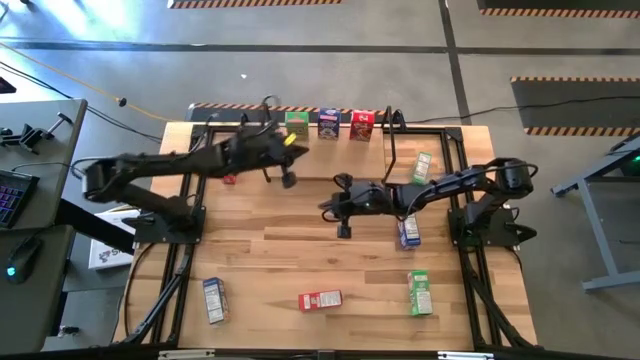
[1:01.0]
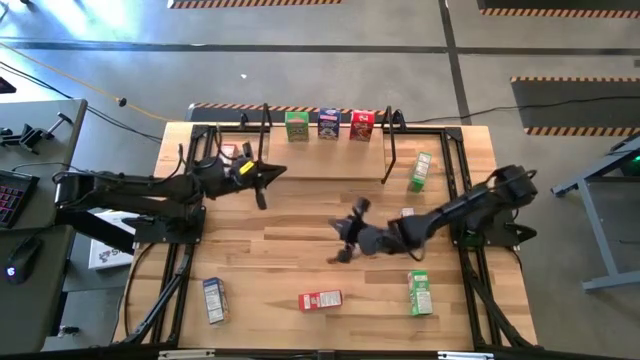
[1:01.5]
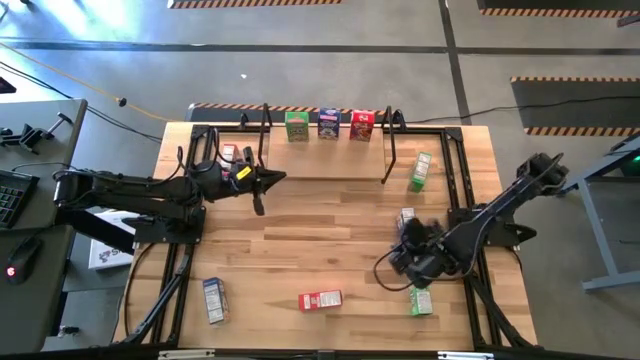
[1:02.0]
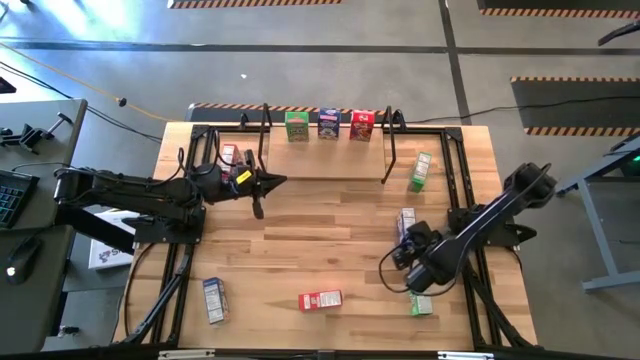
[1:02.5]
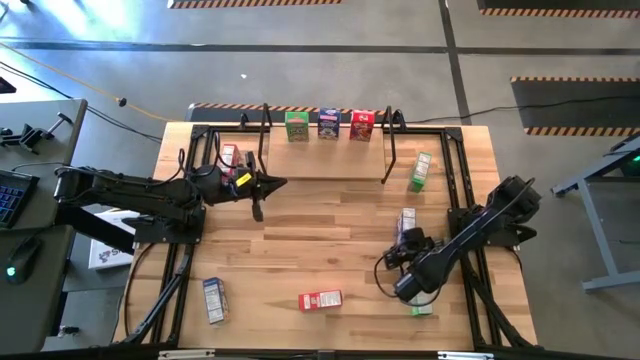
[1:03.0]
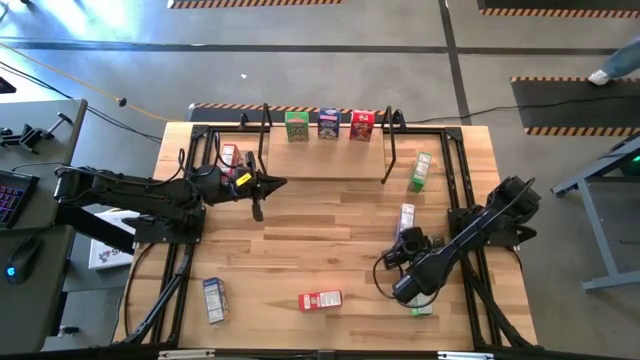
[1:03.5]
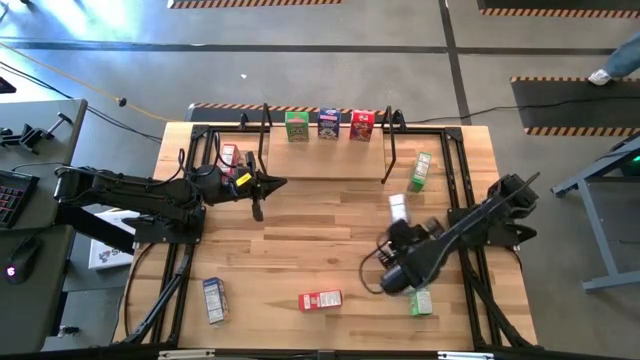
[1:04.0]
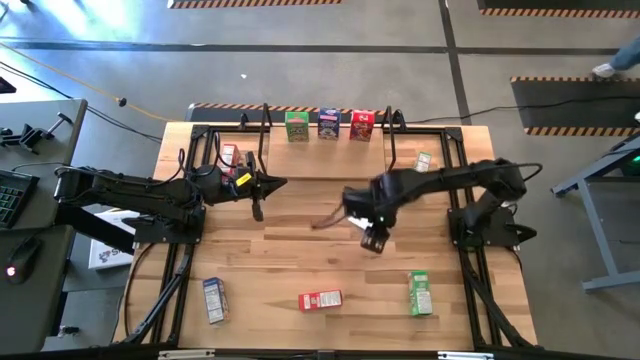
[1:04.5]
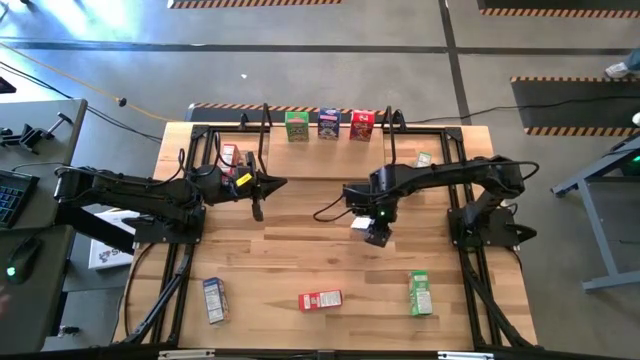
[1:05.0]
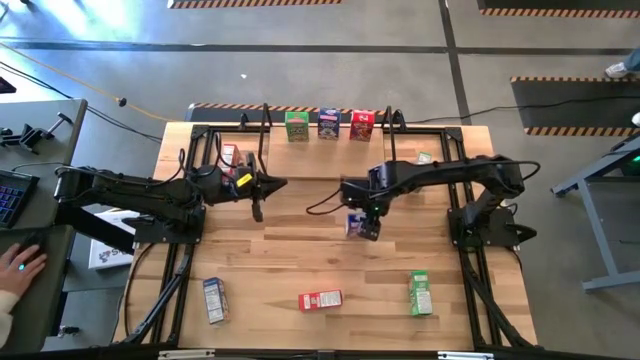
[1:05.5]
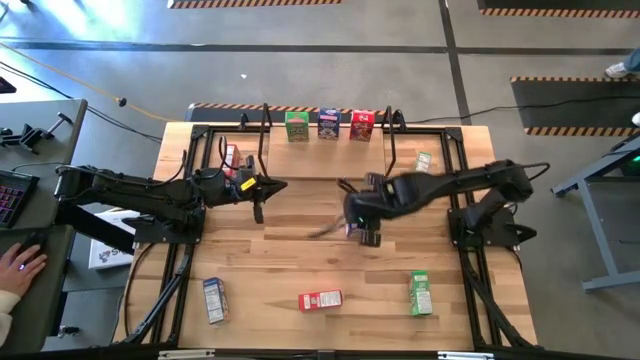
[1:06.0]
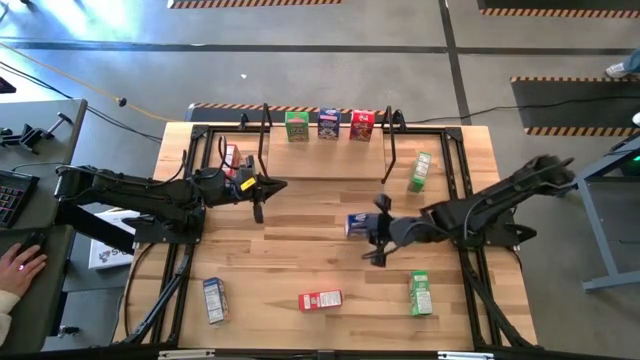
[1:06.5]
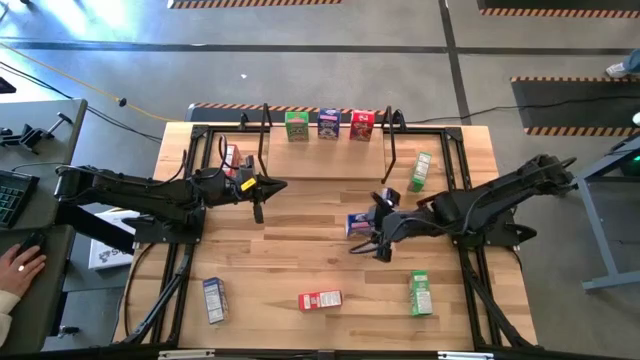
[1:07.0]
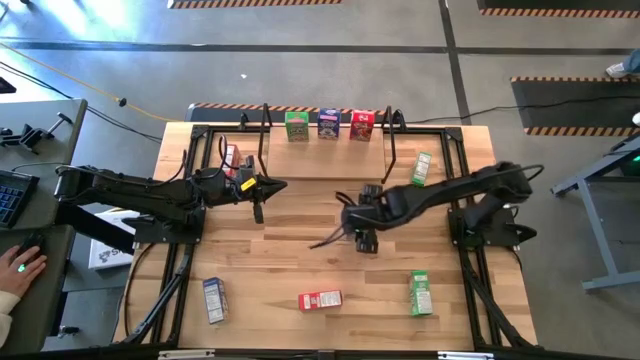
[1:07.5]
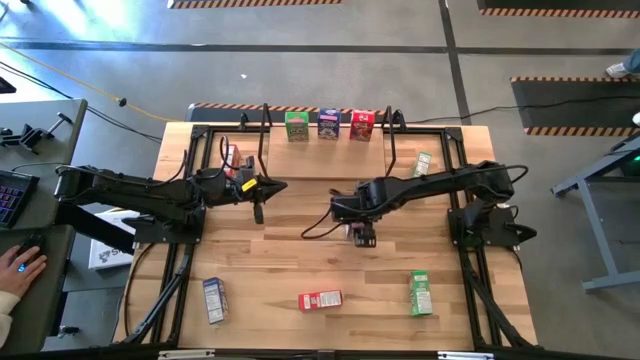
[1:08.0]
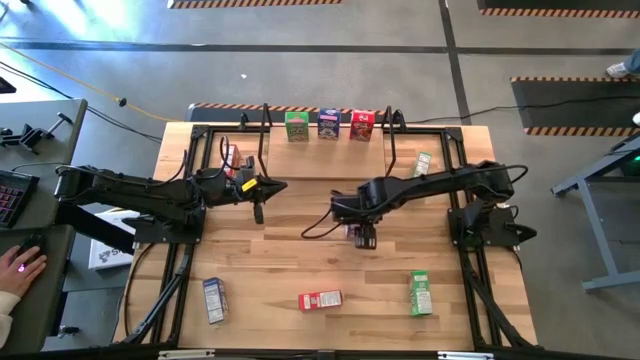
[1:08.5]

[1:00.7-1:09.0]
Task: Stack cereal on shelf
Put the right blue cereal box on the shelf aligned with the blue cereal box

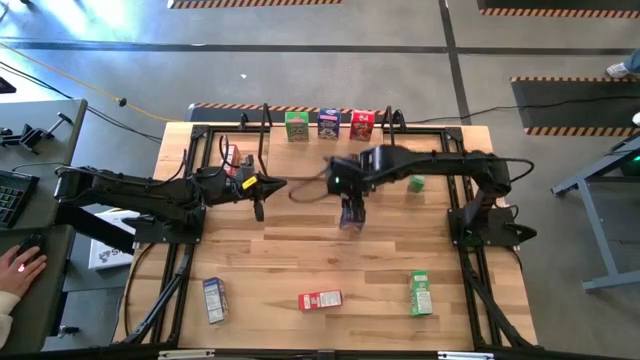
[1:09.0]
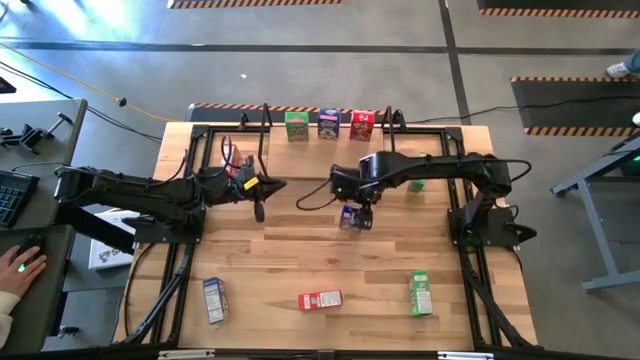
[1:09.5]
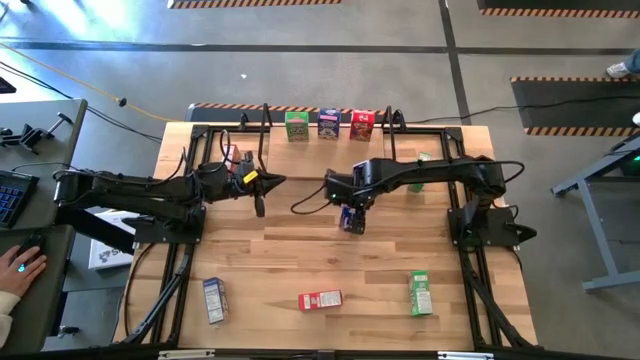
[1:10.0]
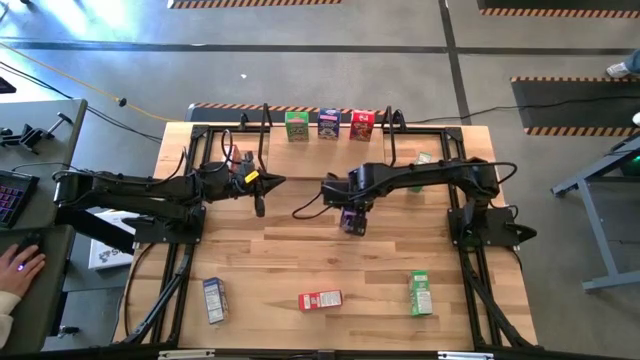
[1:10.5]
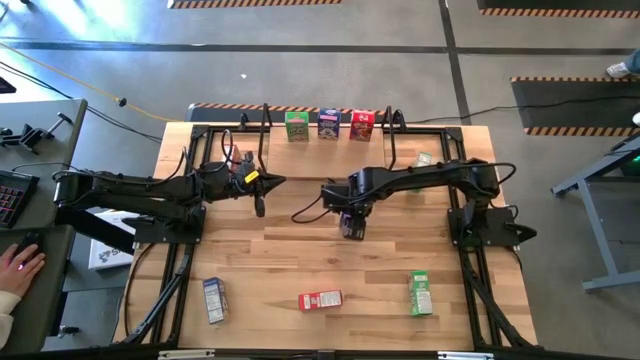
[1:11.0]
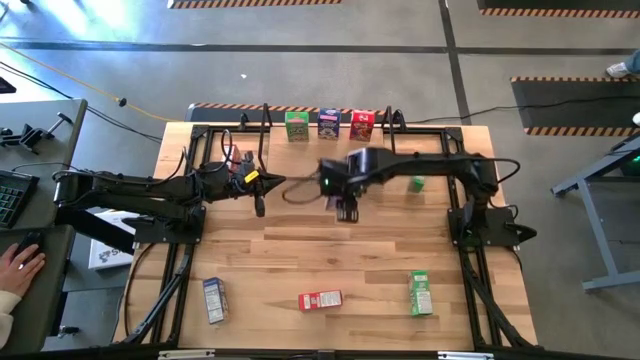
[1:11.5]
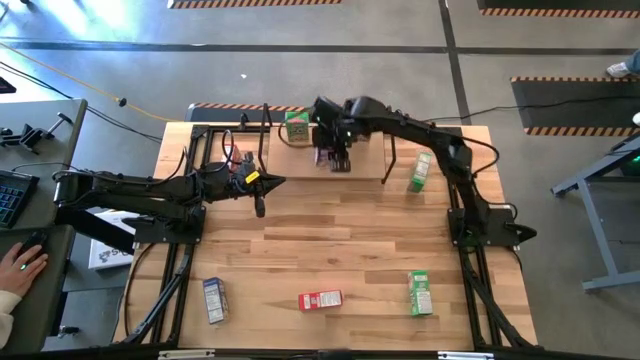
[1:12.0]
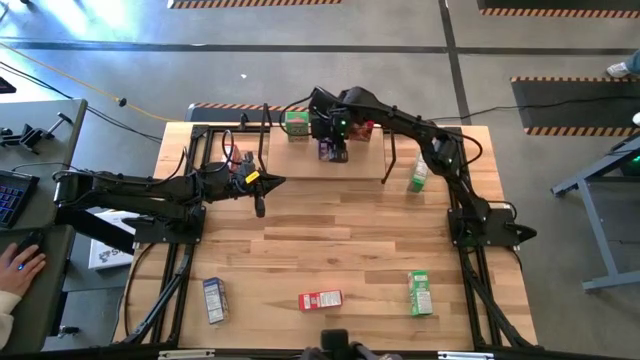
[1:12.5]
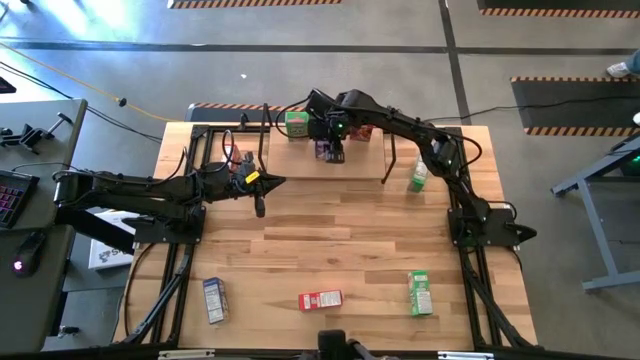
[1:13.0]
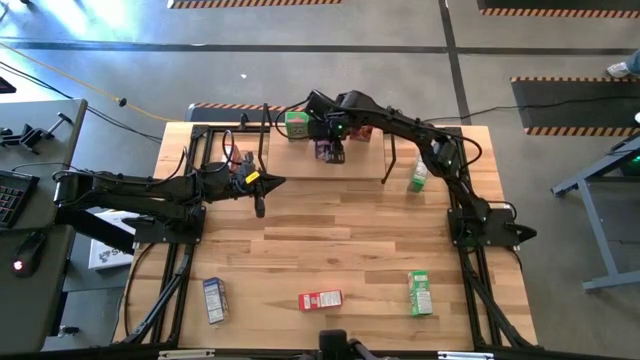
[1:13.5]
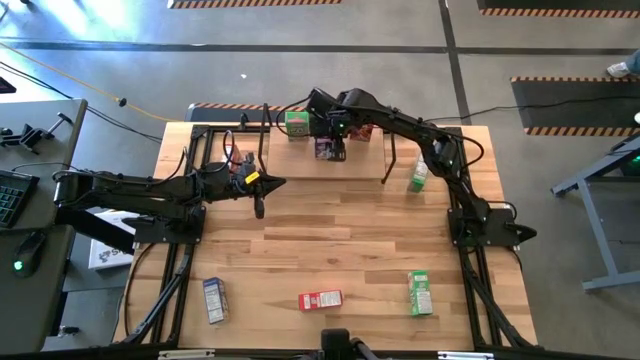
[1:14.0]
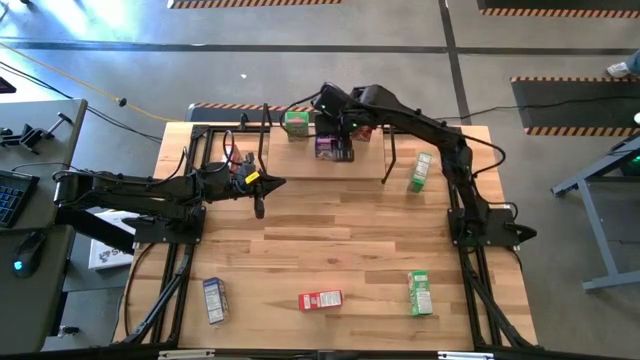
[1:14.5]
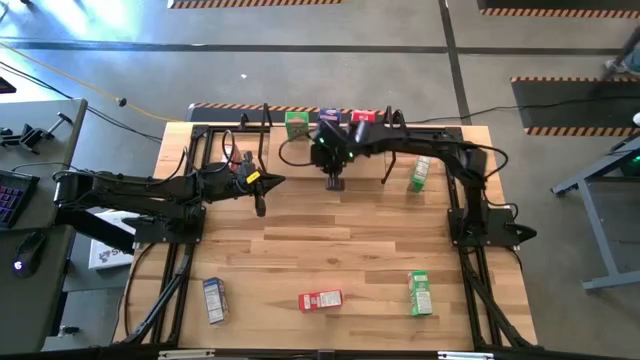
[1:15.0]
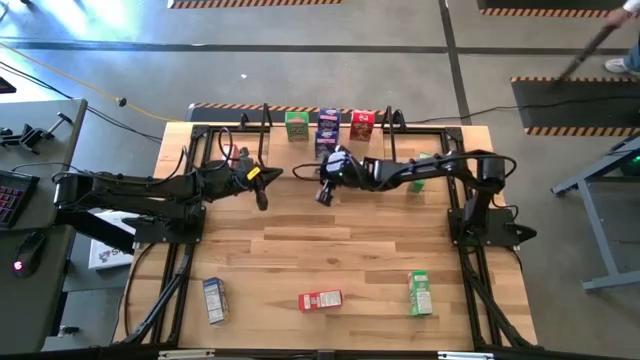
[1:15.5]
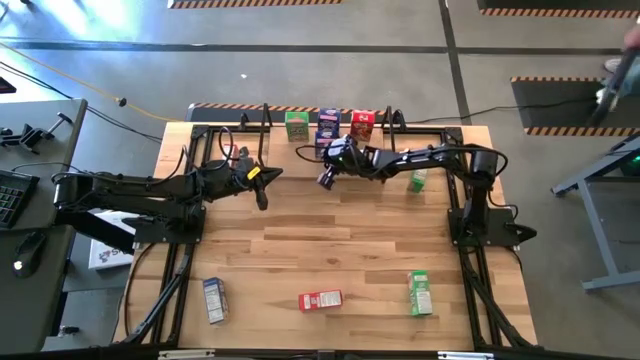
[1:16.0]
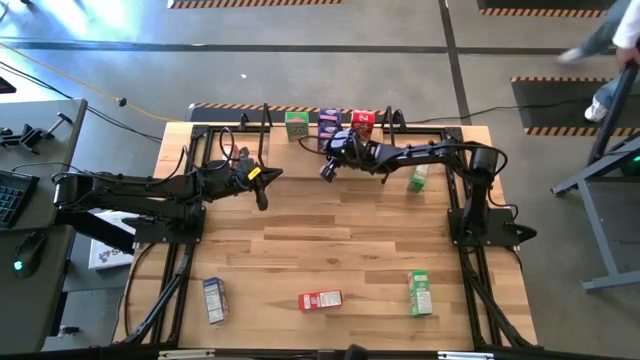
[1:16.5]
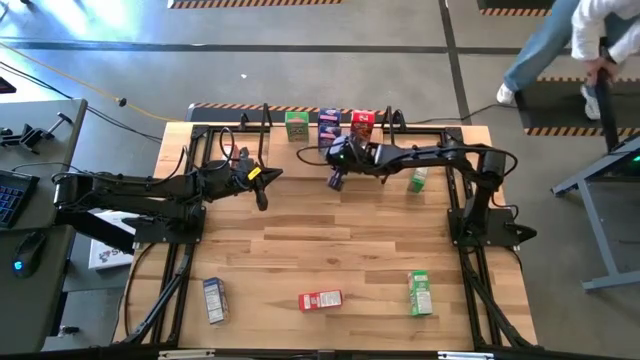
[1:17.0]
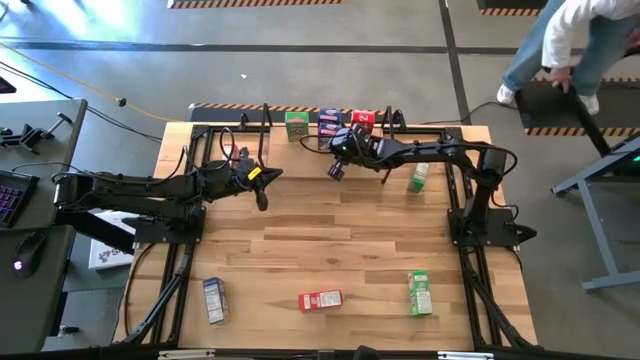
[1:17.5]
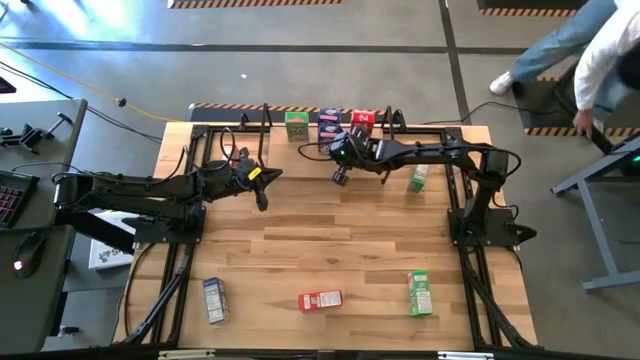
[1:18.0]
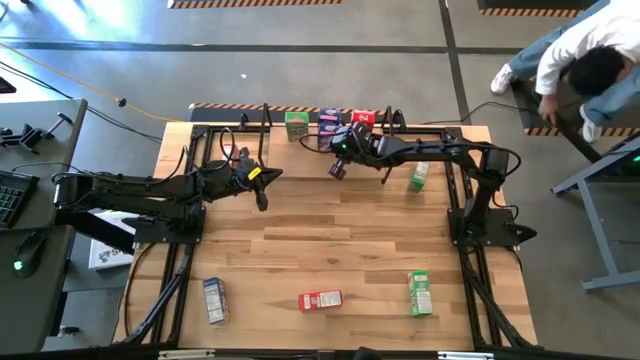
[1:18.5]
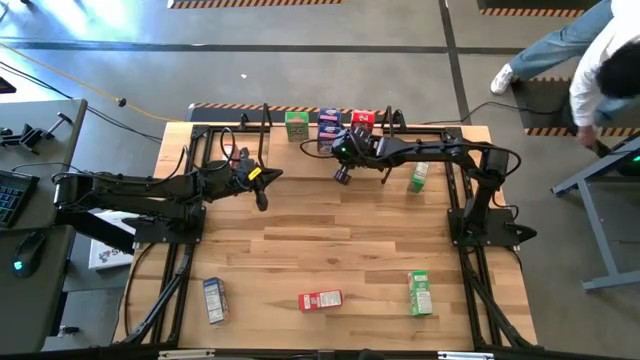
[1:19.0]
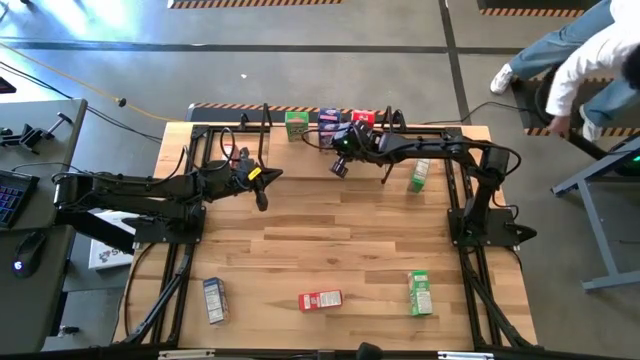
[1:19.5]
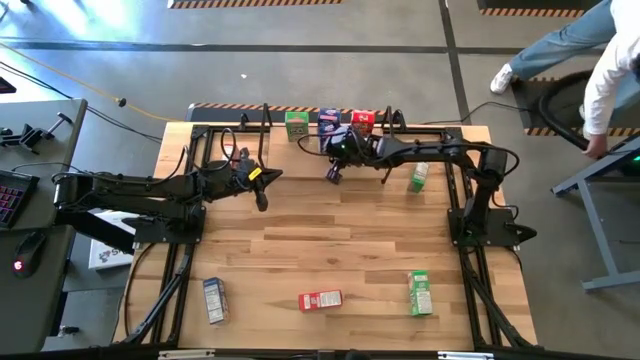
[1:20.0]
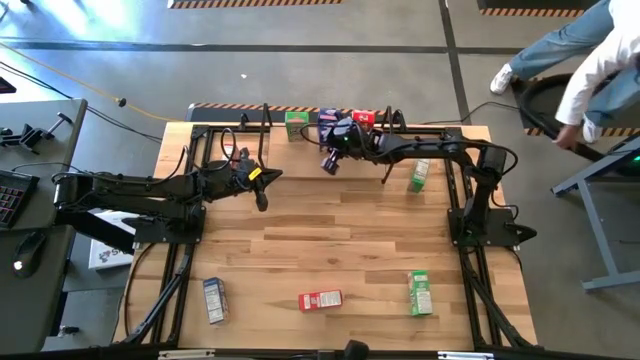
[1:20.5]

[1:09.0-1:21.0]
Put the right blue cereal box on the shelf aligned with the blue cereal box

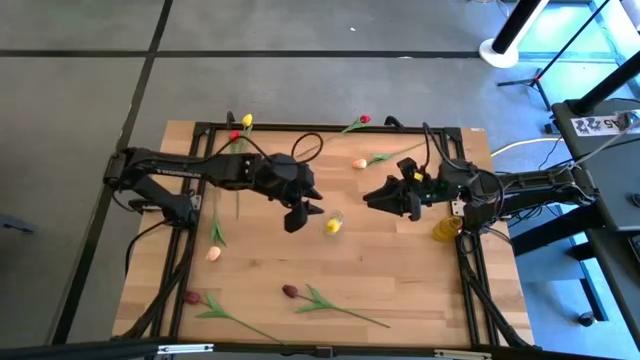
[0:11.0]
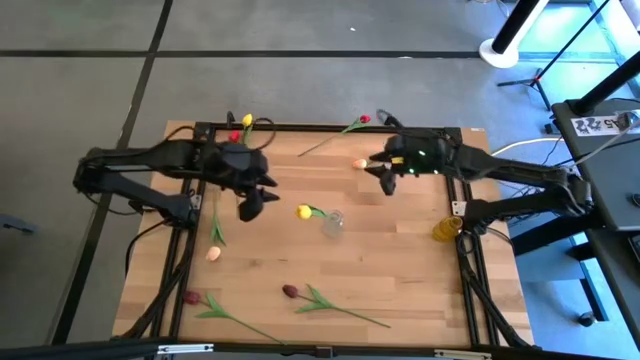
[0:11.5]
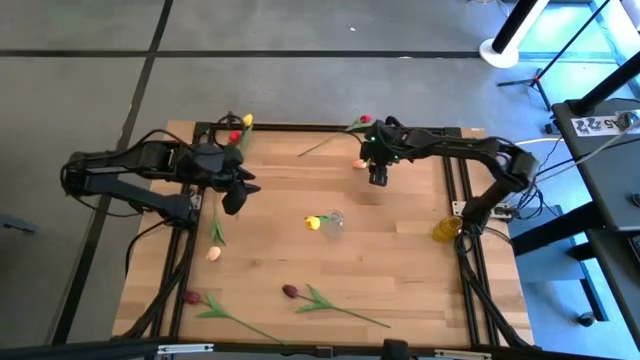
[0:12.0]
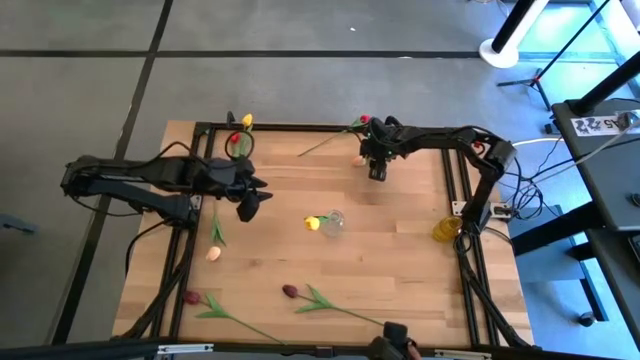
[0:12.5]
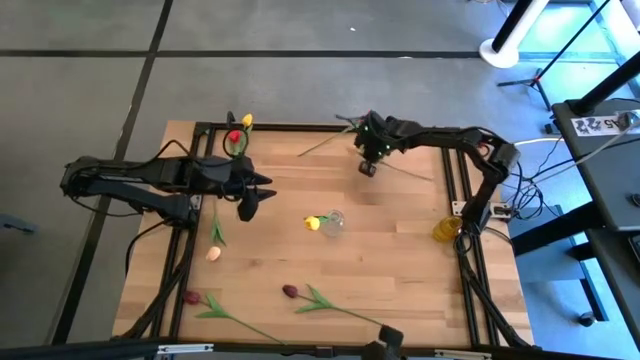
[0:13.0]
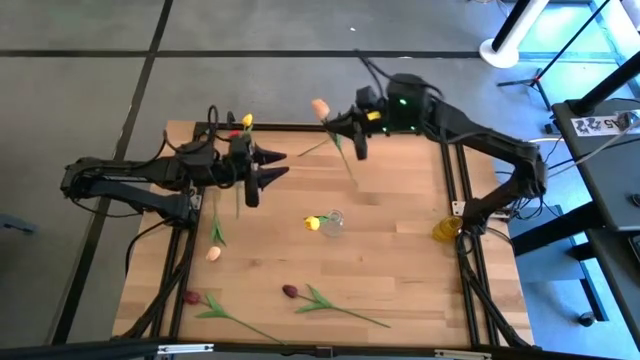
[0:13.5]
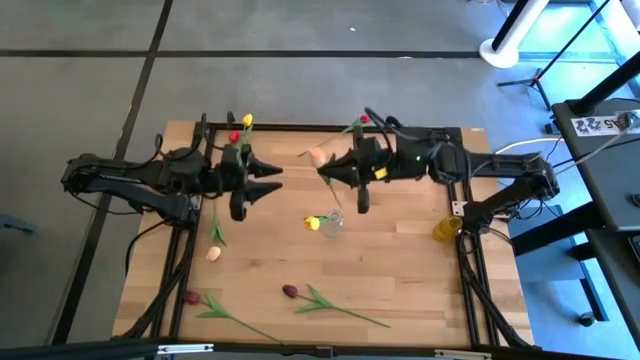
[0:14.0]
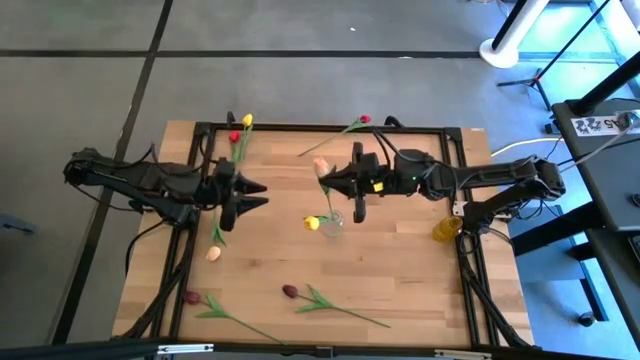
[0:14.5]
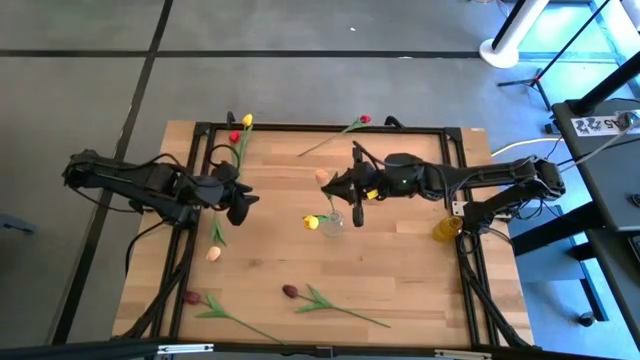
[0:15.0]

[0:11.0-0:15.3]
Task: Sort flowers into vase by color
Put the pink tulip into the transparent vase
